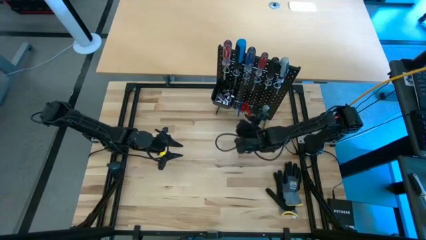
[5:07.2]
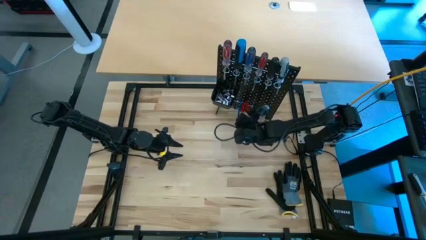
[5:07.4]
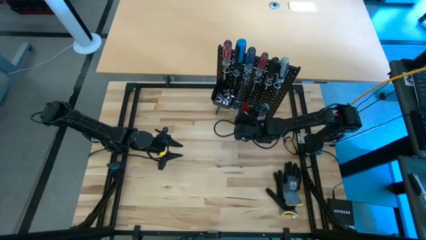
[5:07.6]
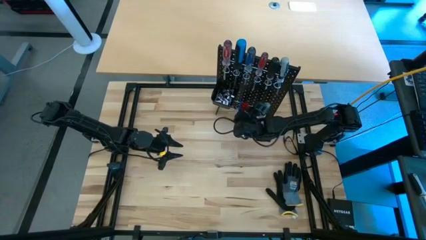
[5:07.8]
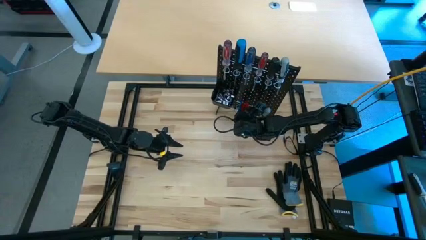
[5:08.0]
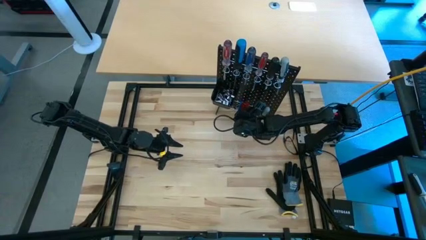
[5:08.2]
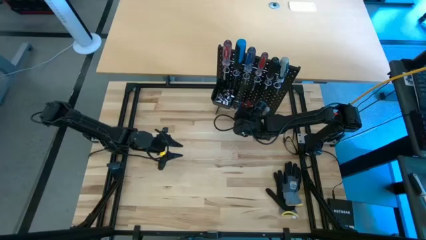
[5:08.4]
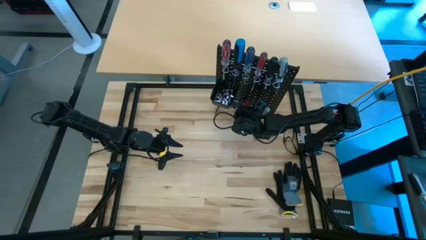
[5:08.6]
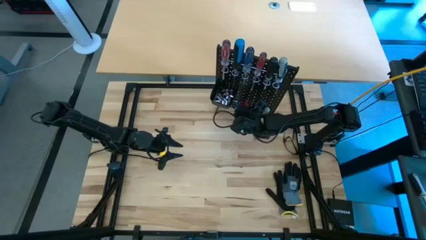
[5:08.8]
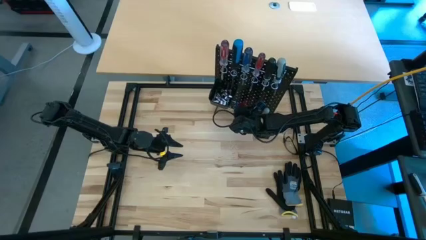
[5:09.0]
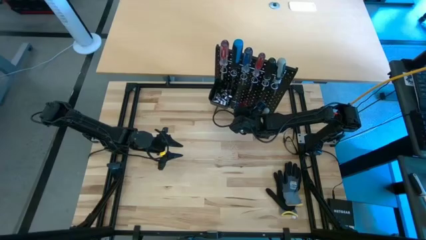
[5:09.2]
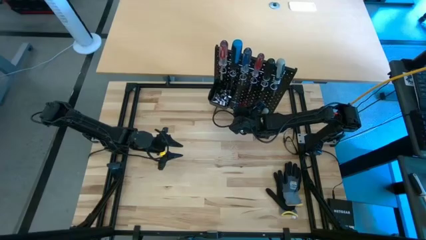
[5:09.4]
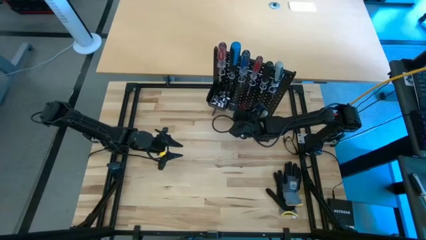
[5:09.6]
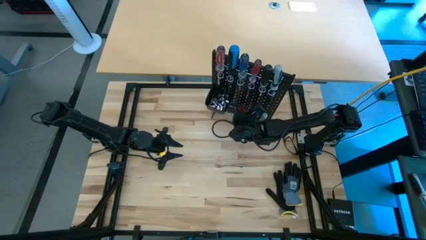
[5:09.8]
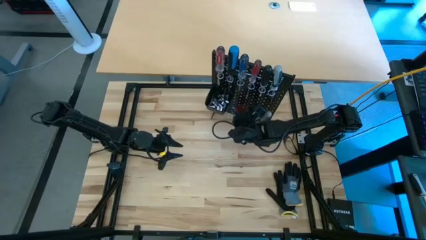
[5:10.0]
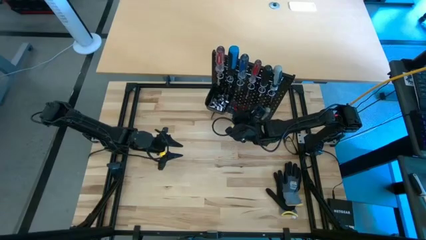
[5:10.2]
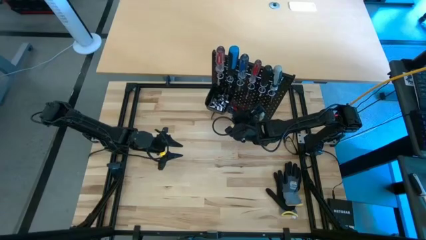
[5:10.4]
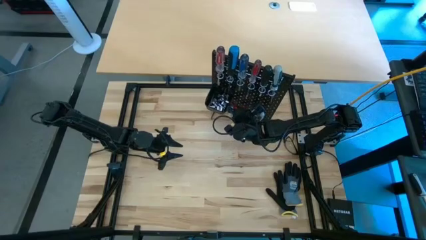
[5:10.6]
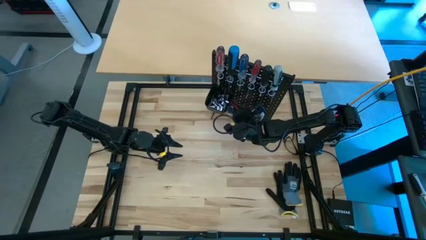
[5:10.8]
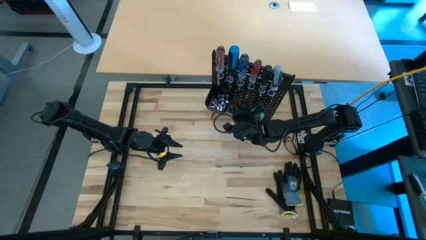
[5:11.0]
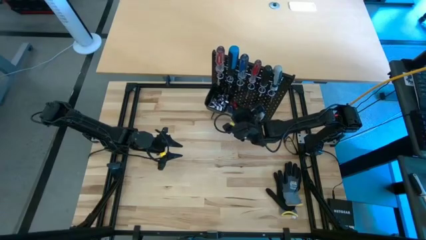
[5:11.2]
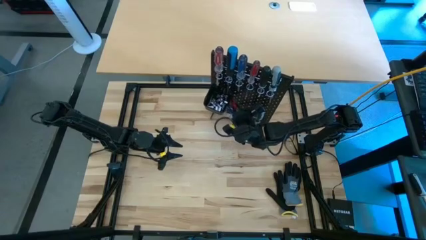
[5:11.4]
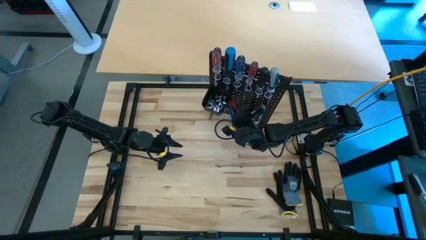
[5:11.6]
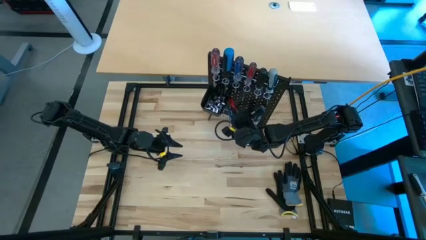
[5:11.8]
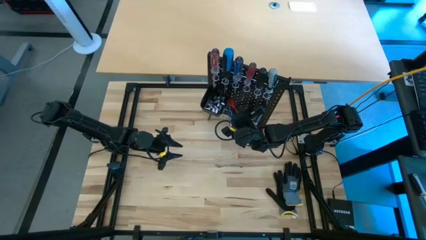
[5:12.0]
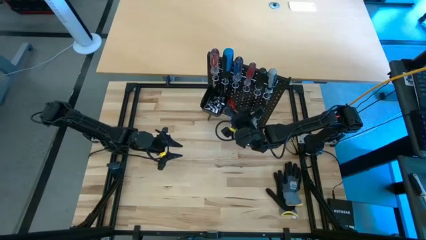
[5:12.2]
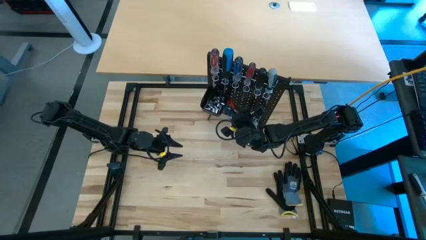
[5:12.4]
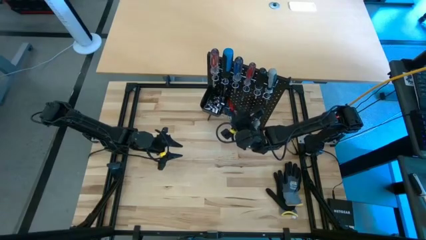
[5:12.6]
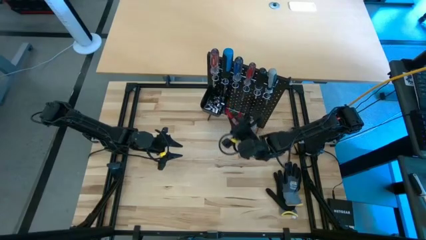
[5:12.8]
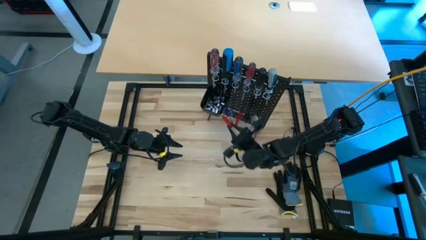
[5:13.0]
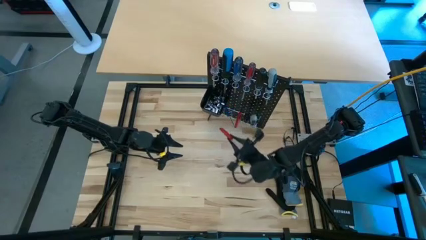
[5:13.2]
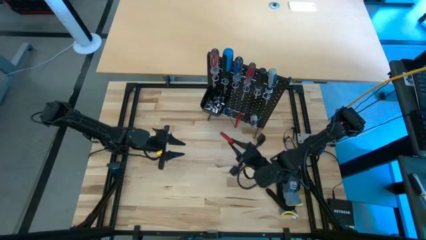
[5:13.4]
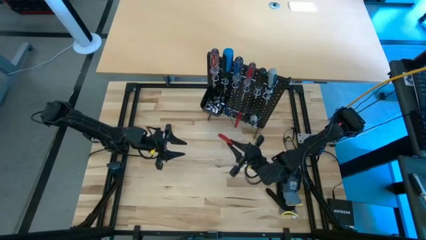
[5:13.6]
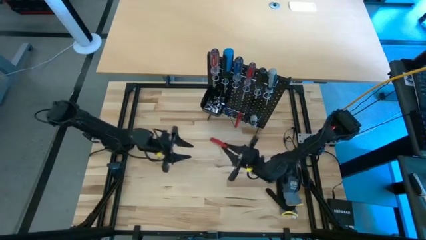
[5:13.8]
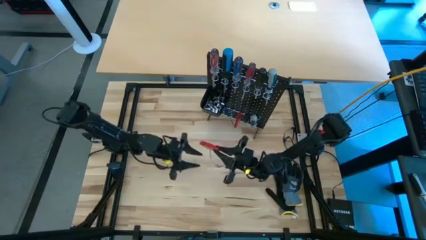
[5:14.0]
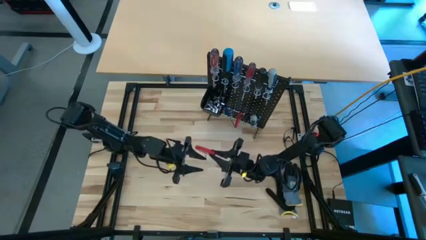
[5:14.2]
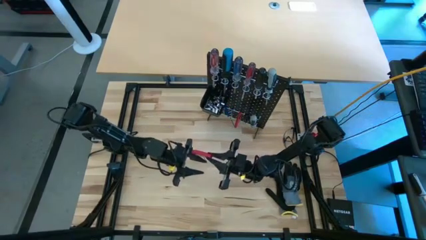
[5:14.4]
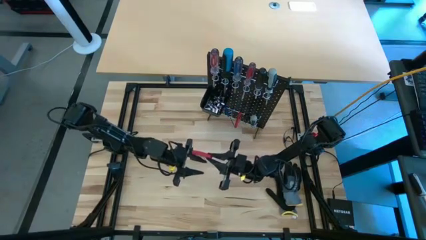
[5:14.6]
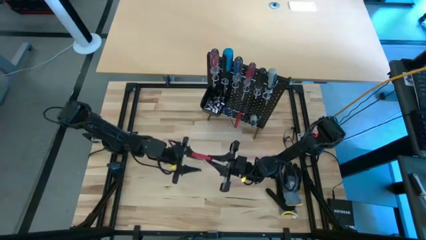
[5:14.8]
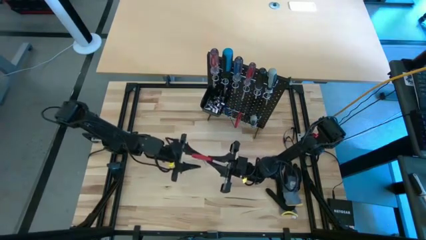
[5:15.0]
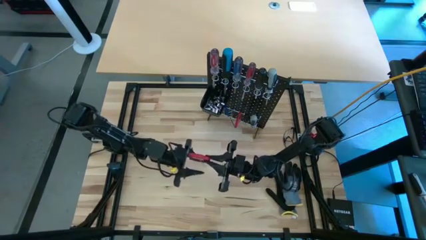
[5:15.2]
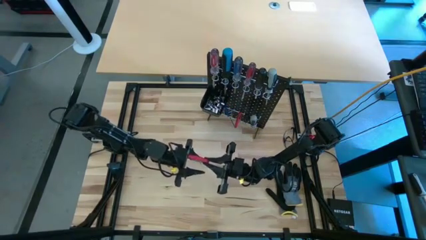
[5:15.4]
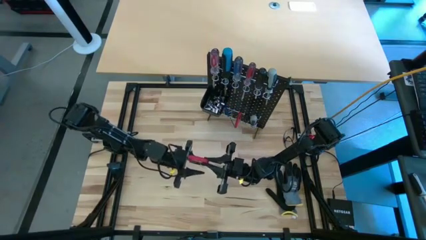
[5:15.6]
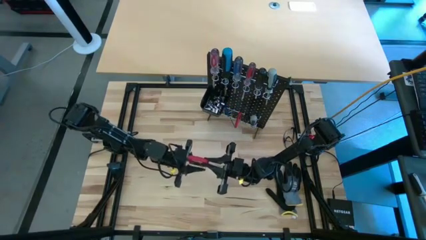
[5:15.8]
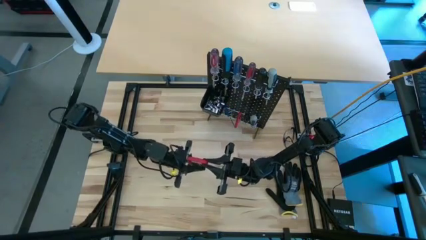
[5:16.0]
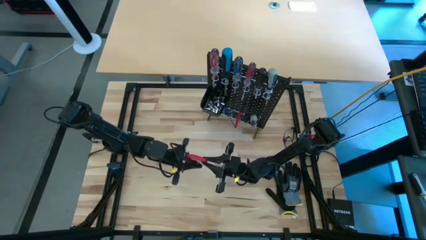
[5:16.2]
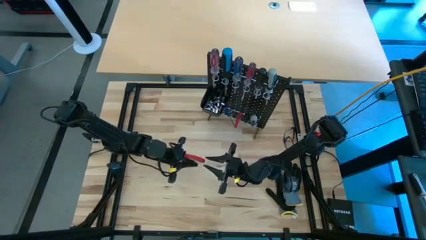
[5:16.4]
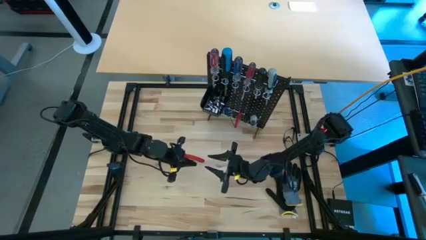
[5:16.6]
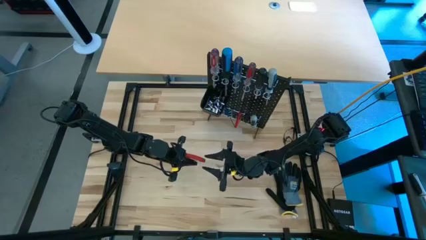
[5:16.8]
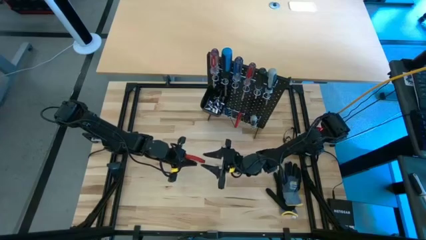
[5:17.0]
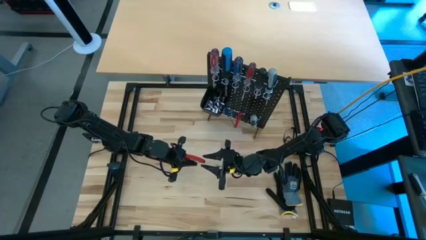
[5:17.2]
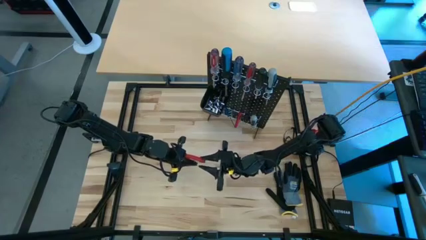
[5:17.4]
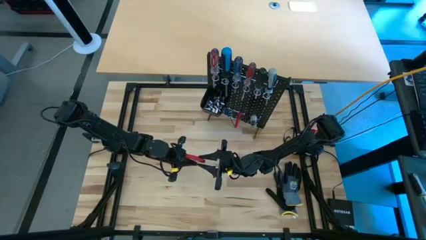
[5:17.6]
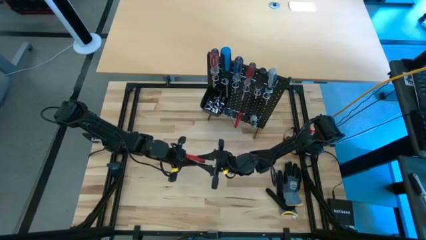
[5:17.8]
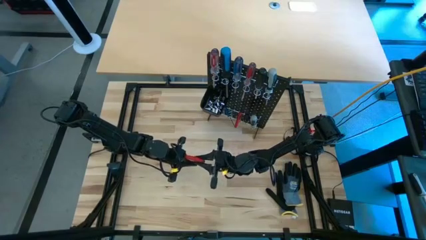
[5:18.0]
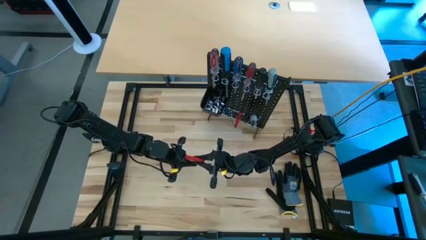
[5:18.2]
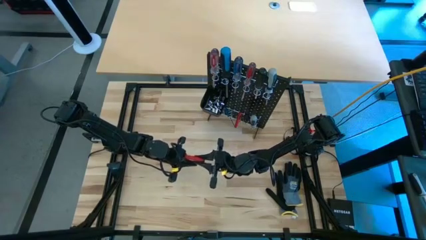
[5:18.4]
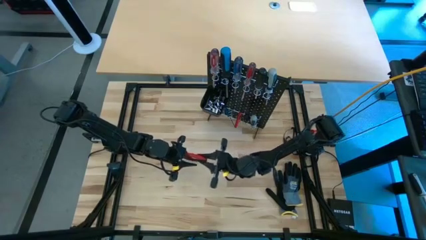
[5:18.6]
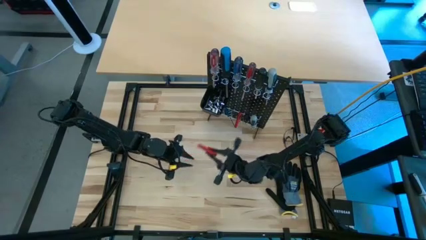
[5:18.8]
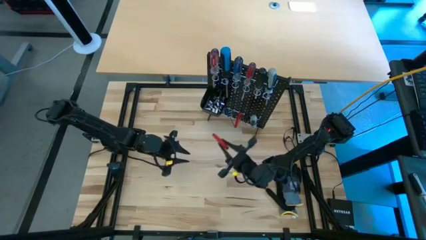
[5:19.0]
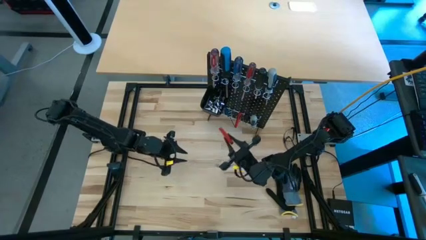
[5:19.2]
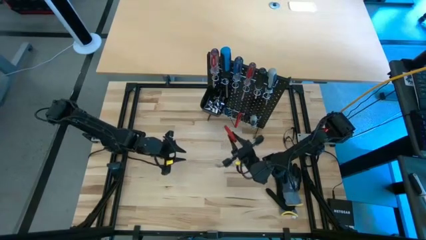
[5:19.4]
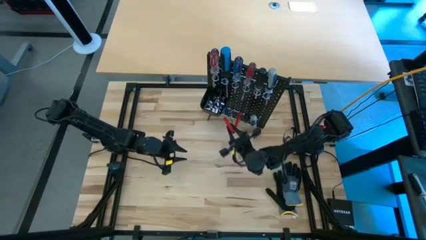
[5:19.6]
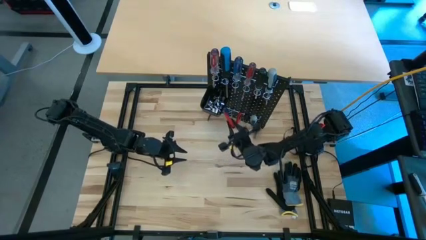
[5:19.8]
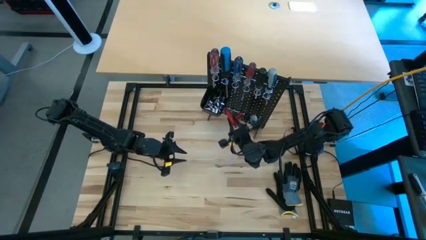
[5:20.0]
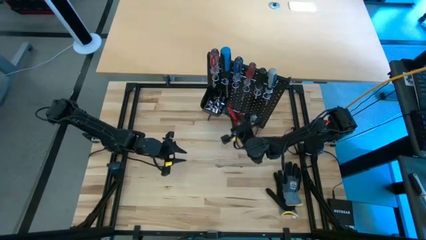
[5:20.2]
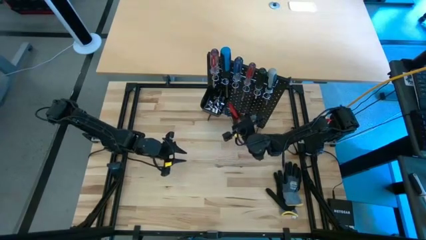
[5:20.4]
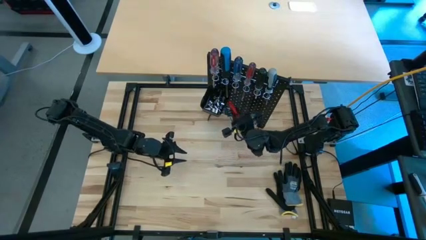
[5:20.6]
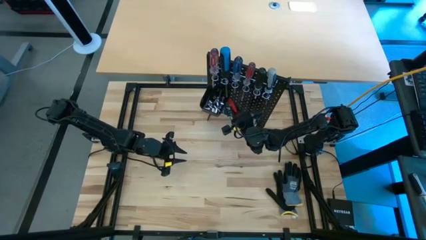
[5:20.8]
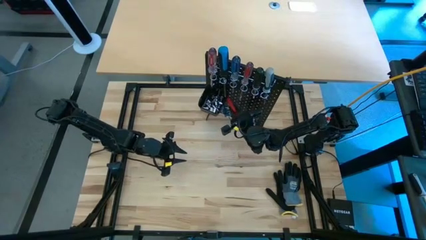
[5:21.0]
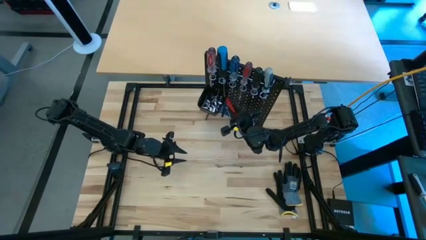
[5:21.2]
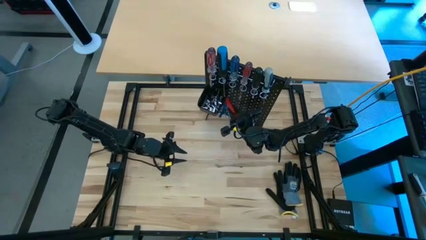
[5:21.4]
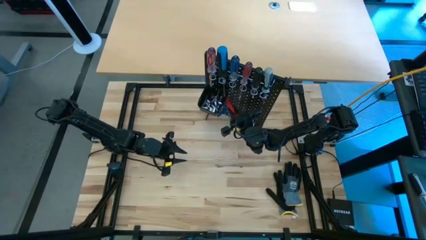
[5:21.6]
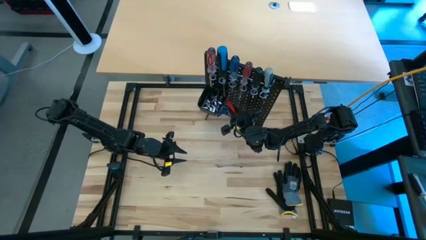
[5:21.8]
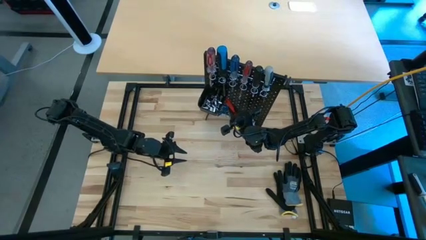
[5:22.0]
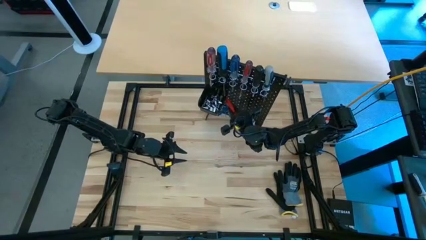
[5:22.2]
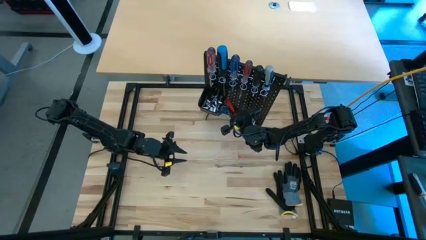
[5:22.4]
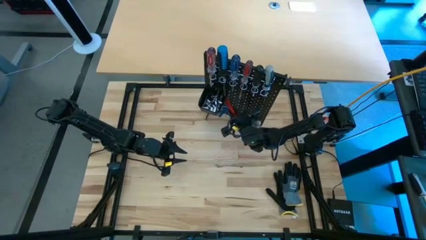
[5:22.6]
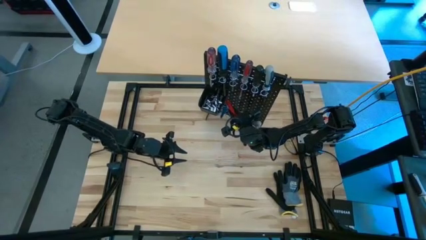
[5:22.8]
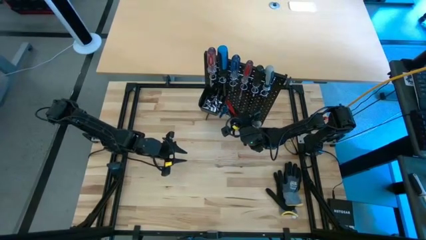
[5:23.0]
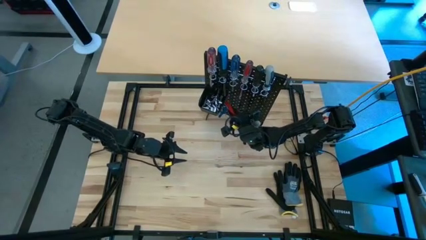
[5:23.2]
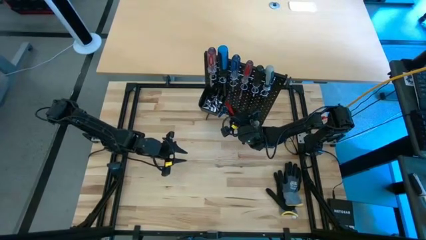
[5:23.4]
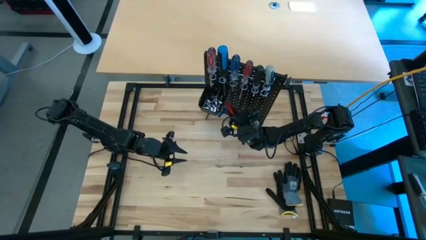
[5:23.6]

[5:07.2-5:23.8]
Task: Hang tools onto peg board
Hang the red allen wrench on the black pegboard
